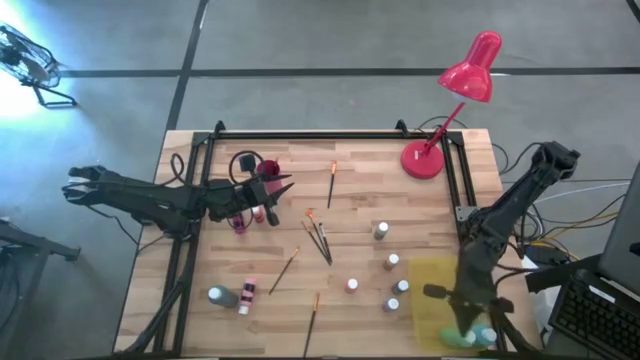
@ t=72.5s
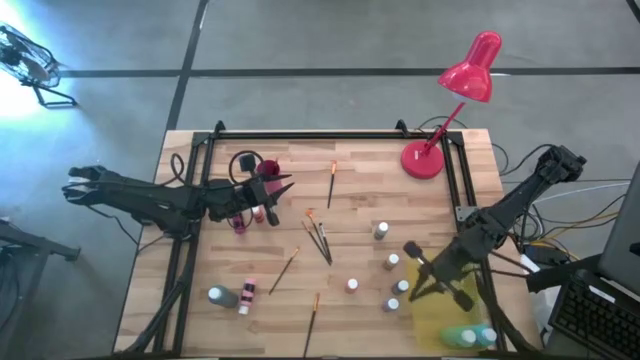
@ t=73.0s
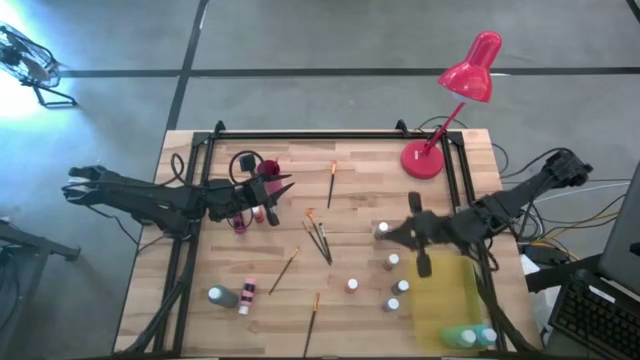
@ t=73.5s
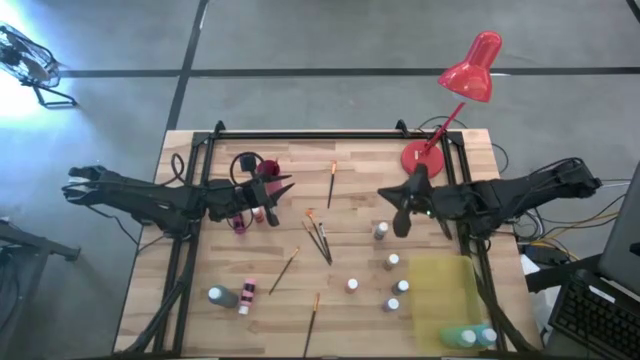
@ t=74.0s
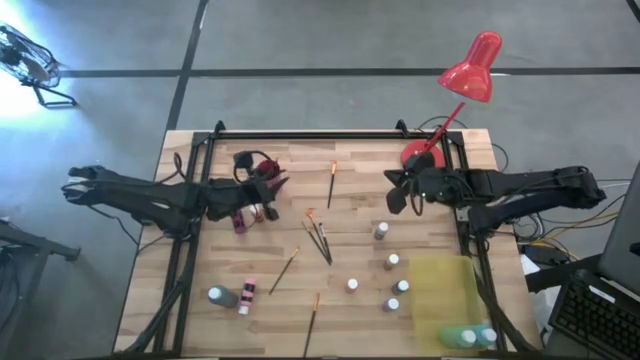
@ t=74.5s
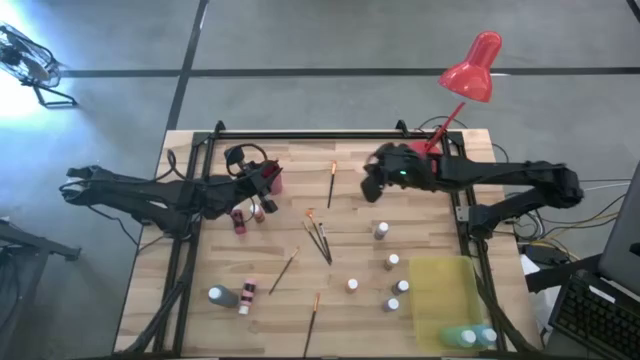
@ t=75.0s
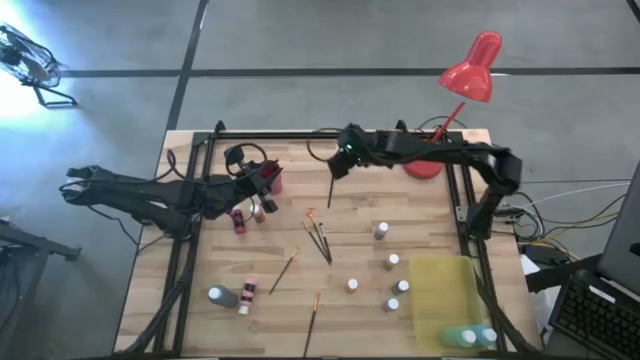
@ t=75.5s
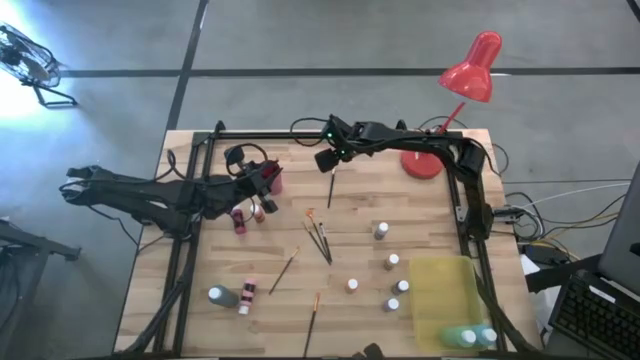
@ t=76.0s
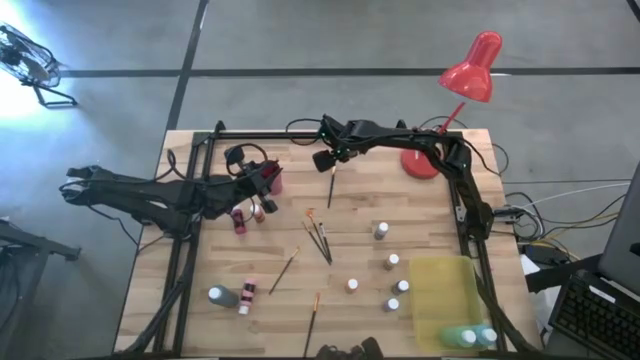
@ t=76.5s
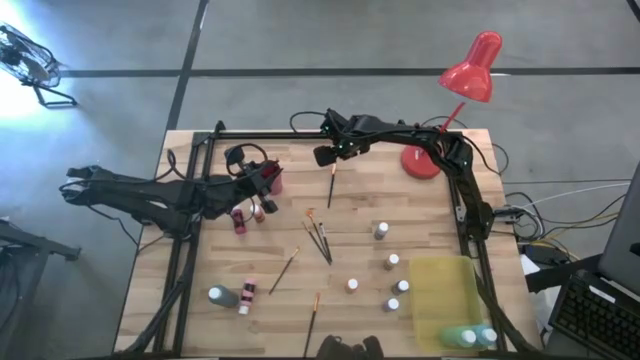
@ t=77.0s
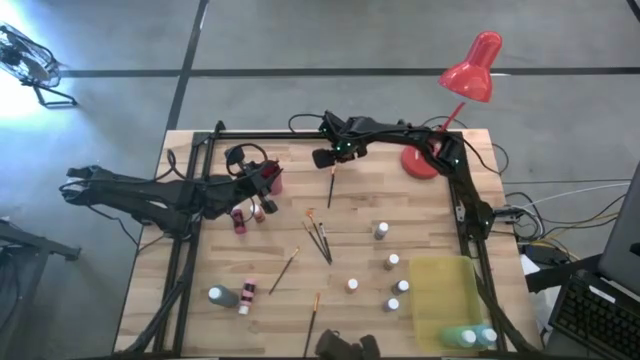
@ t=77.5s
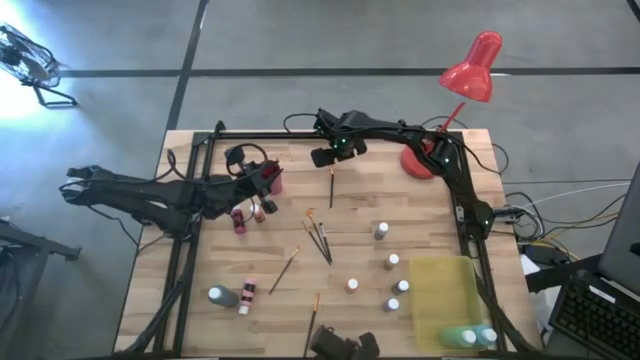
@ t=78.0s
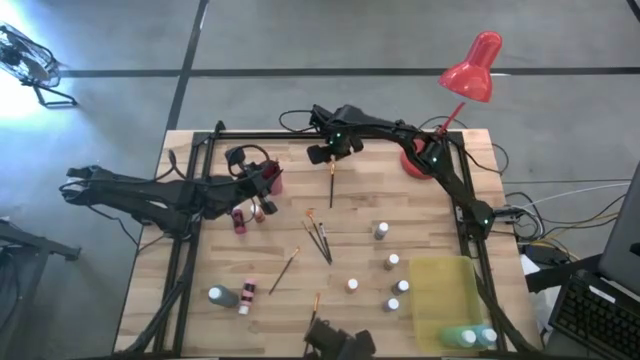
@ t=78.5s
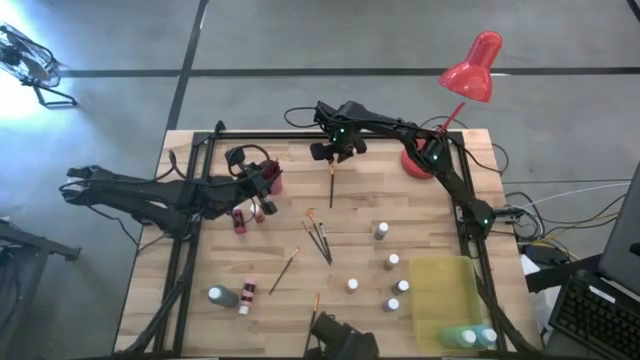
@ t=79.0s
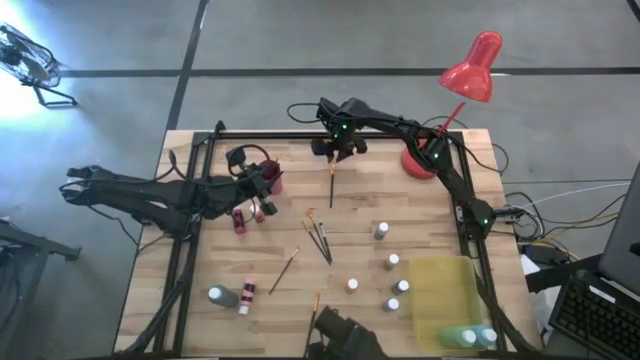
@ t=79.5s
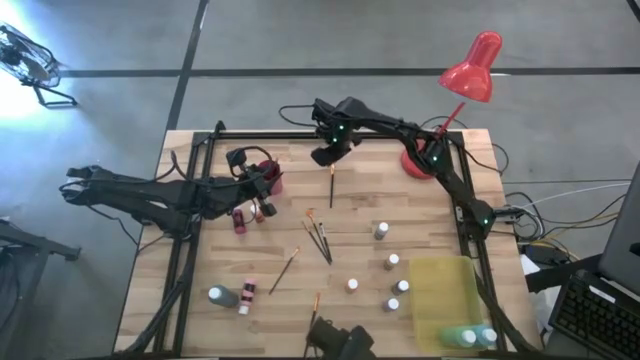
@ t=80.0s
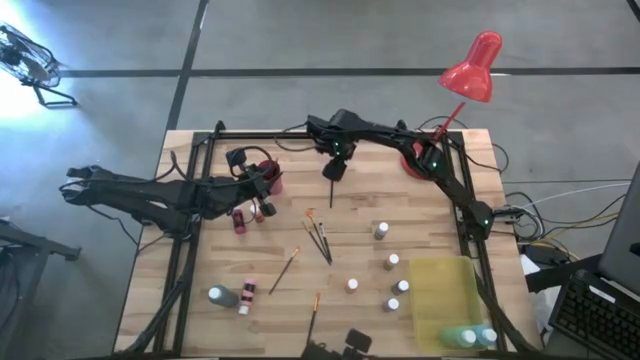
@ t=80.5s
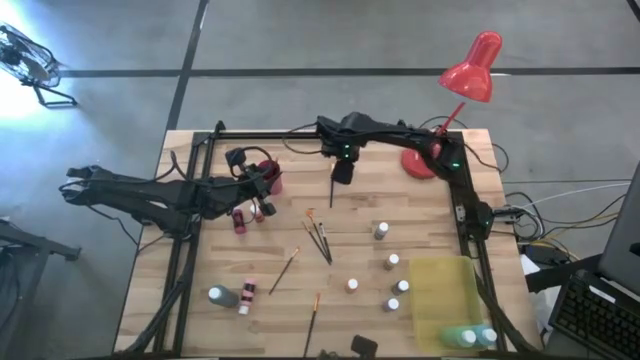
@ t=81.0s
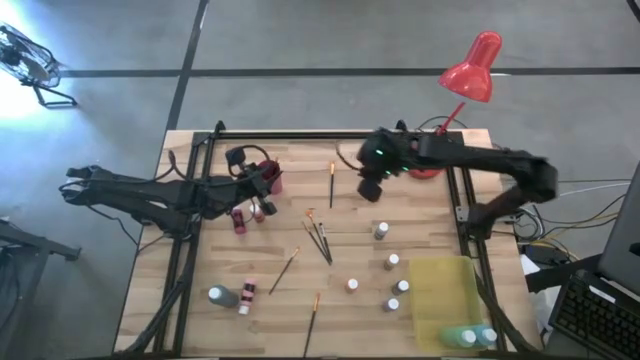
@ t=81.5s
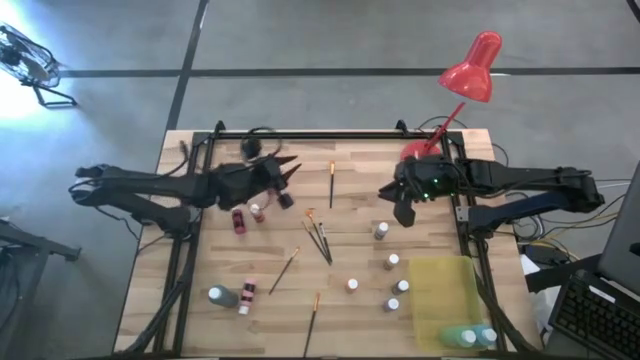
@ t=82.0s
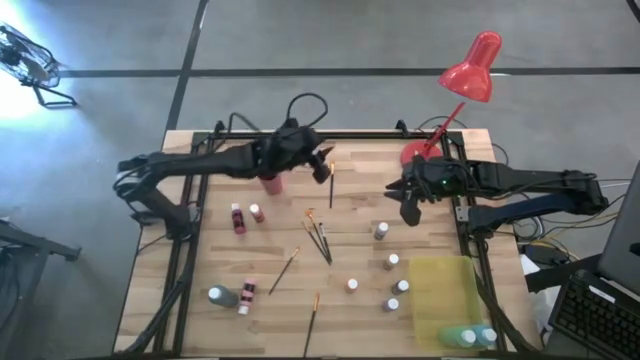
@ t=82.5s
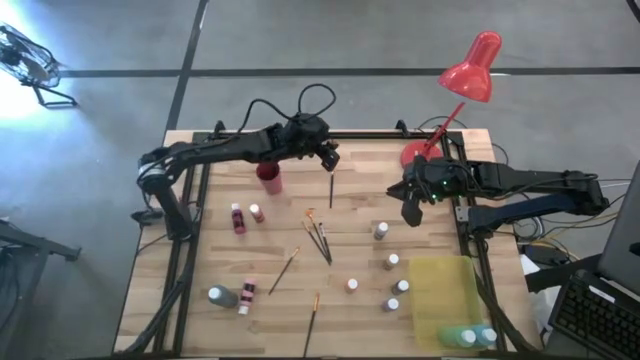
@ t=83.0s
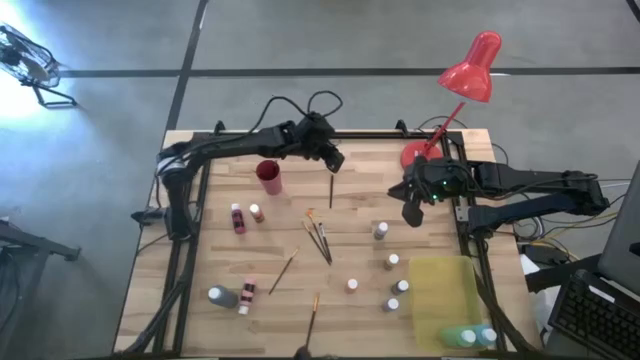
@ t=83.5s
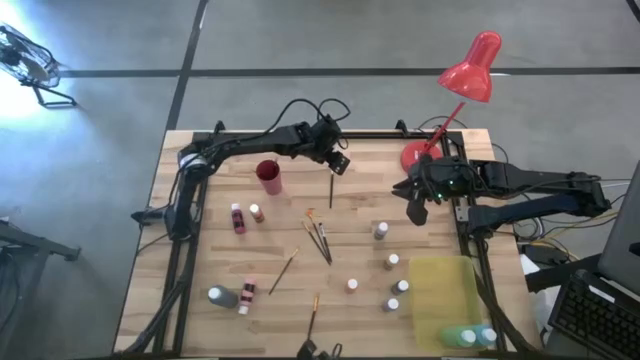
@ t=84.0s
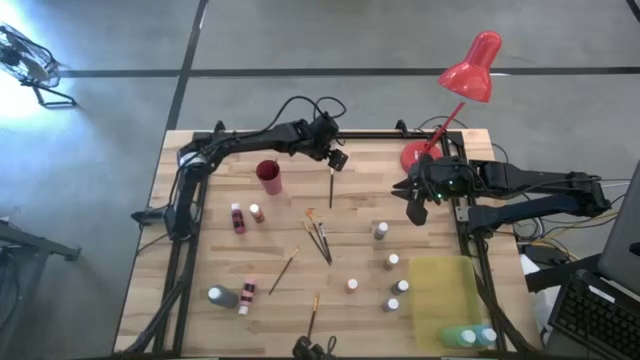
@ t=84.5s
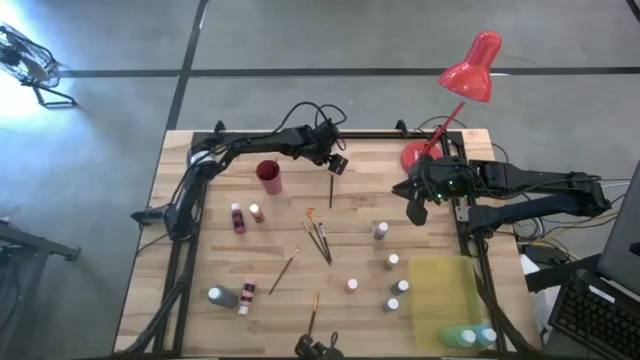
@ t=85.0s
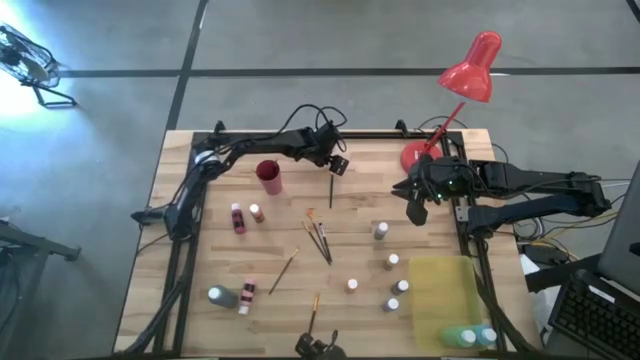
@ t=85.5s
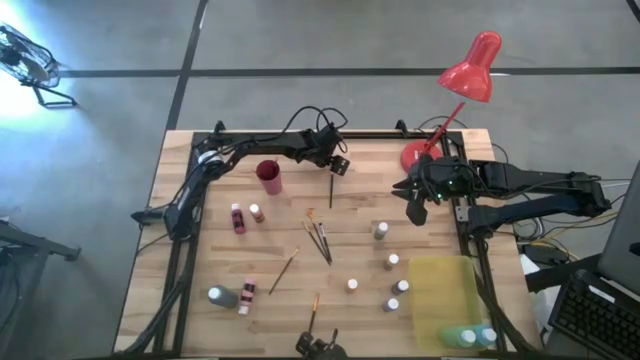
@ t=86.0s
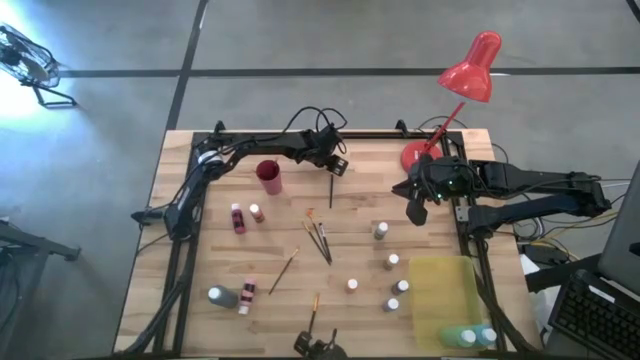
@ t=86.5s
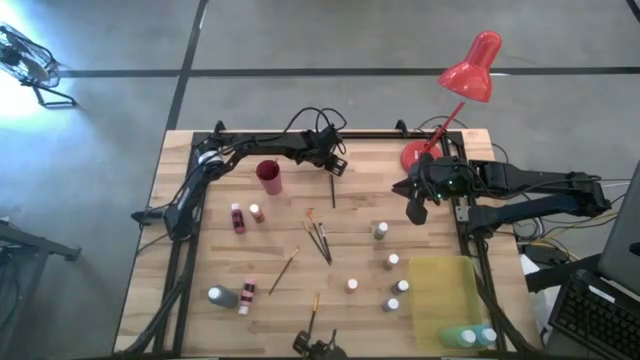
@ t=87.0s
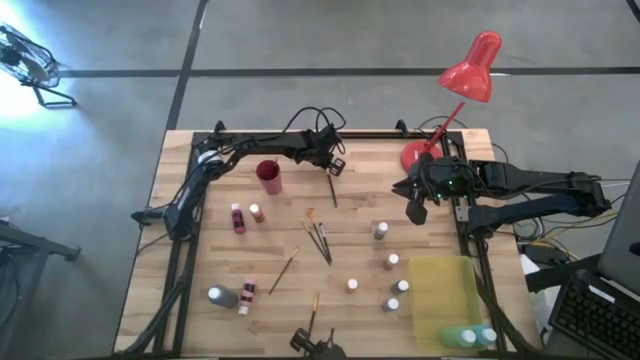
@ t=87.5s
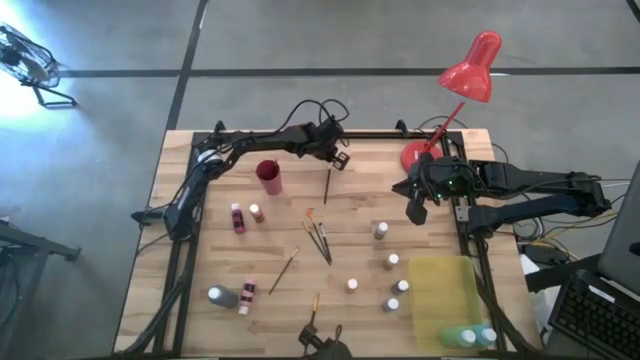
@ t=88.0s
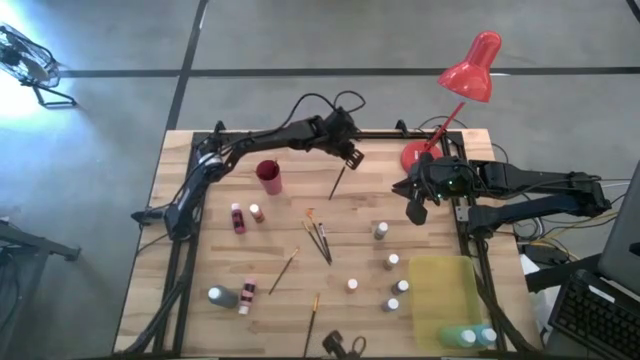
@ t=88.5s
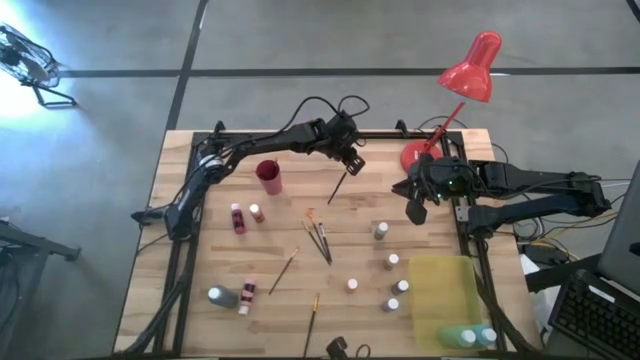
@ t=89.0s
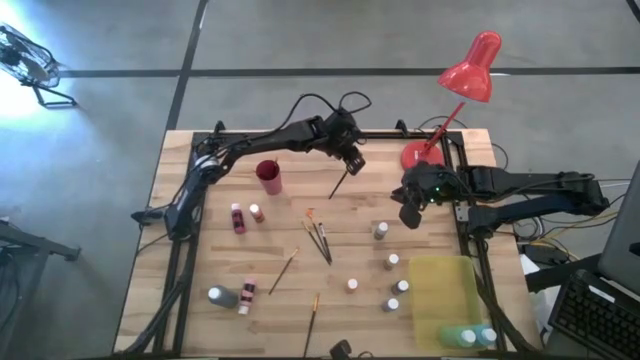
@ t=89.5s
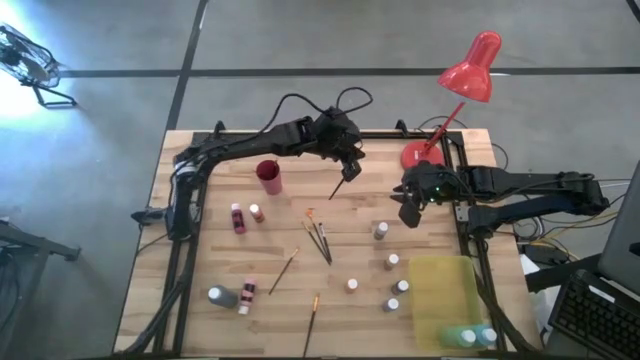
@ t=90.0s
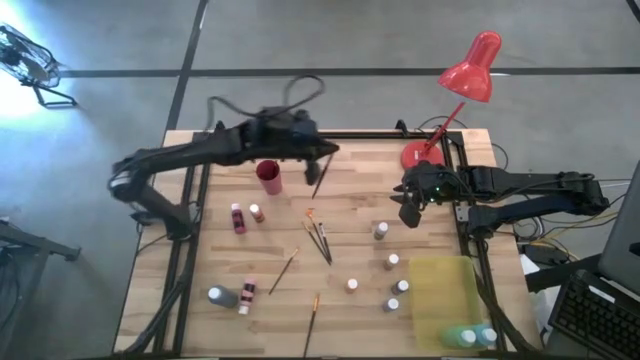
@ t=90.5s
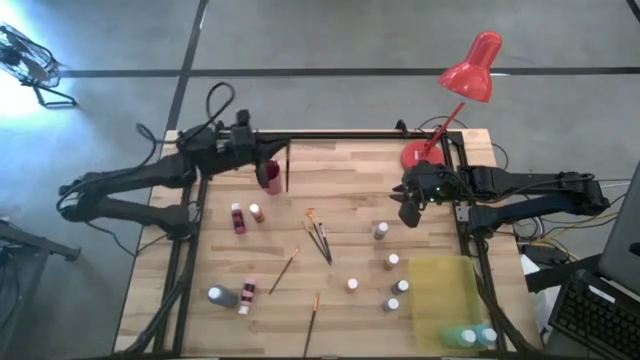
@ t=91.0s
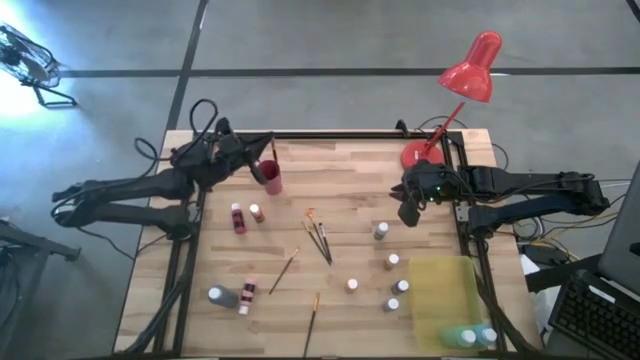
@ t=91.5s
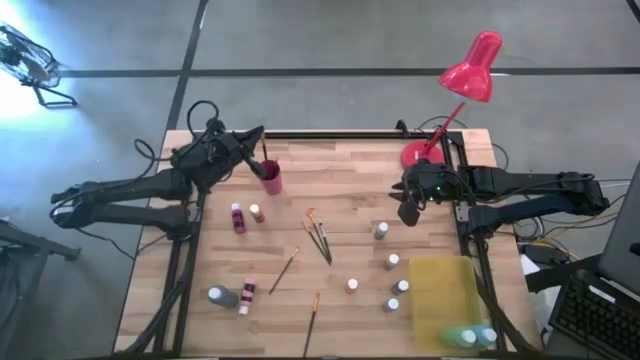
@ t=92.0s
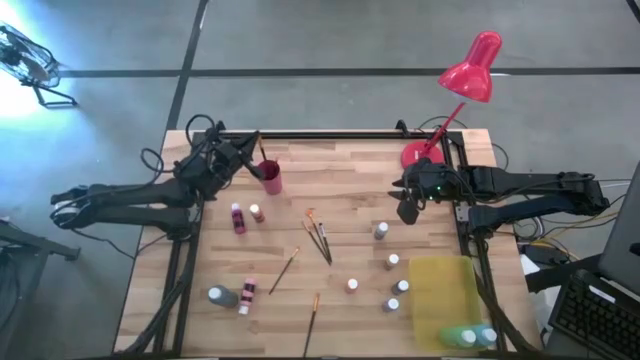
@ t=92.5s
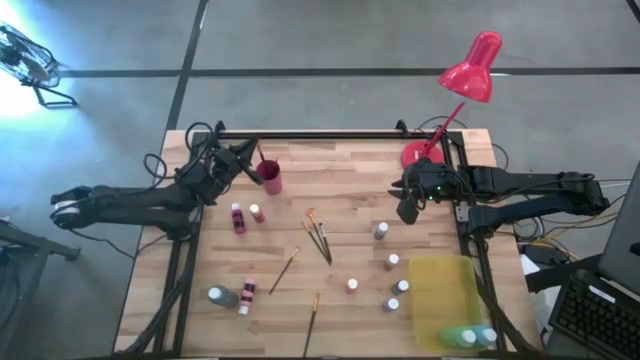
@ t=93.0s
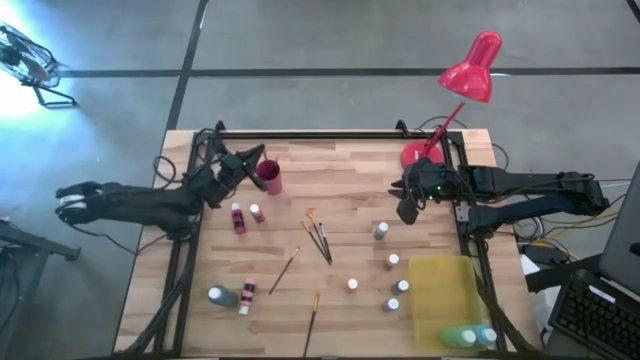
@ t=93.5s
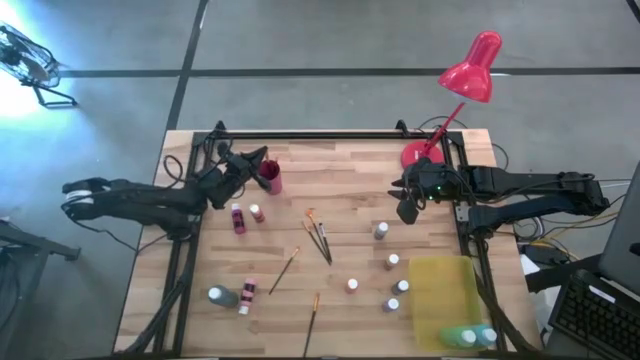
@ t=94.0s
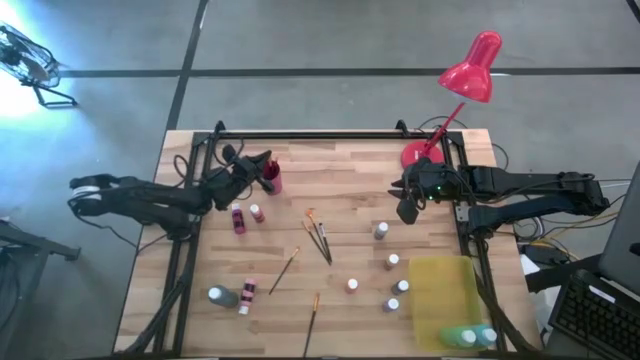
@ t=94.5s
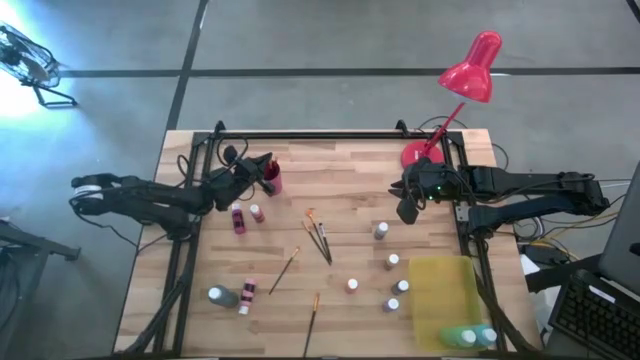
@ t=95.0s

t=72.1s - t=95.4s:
Task: Pick & Place Paint Supplies
Put the black paint brush into the pink cup
